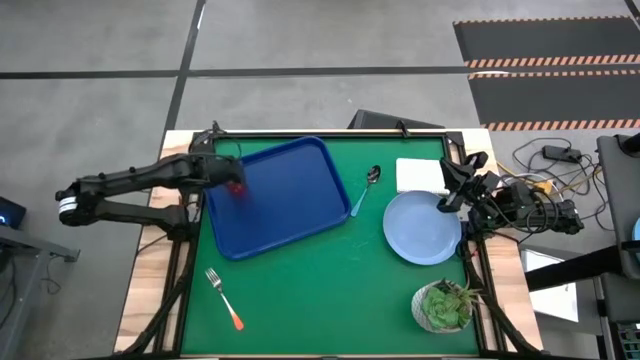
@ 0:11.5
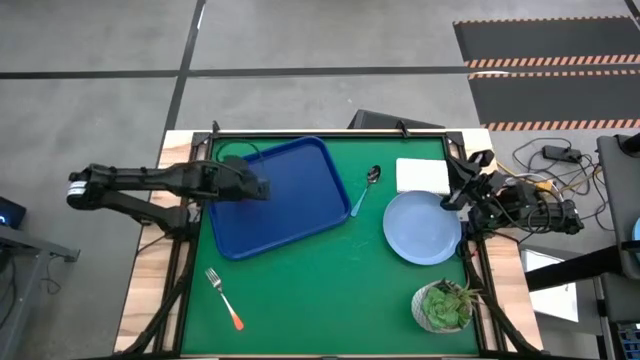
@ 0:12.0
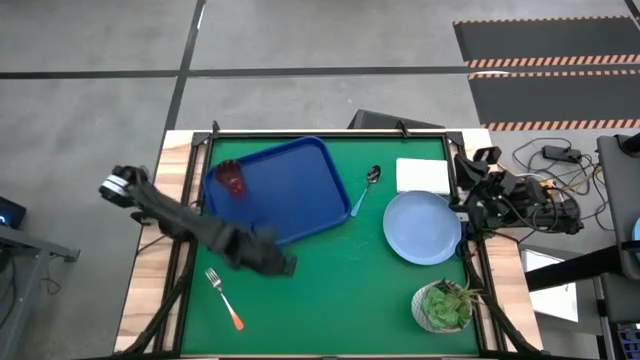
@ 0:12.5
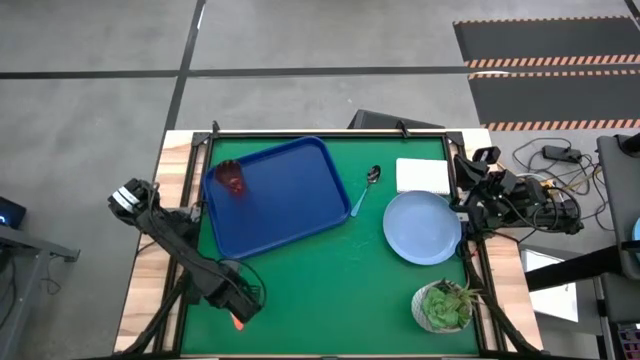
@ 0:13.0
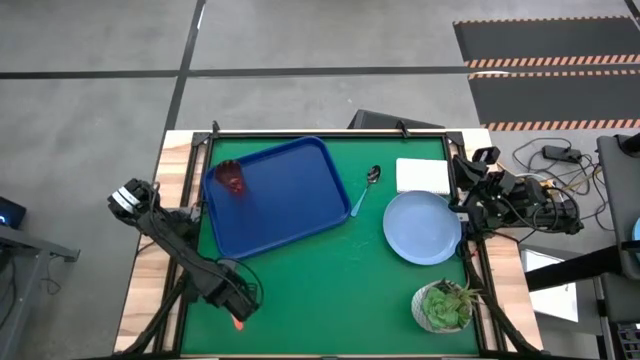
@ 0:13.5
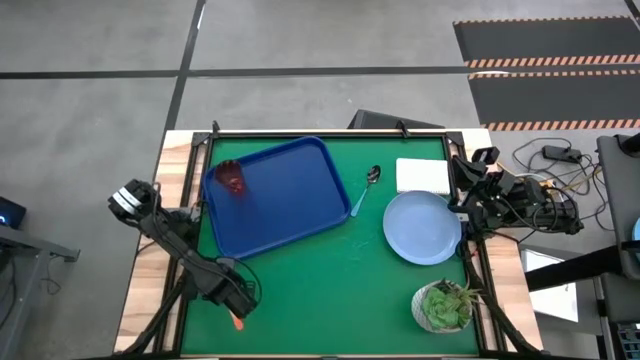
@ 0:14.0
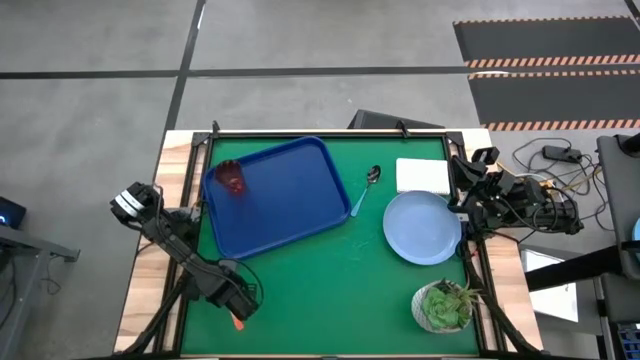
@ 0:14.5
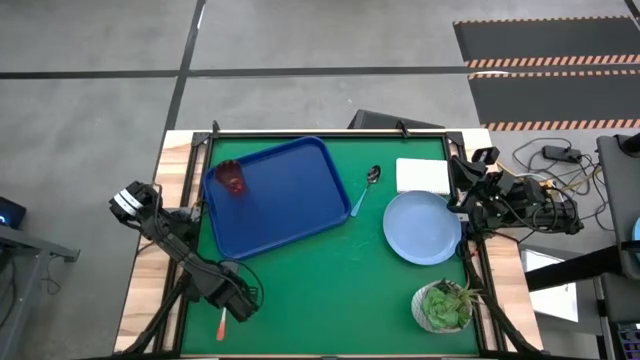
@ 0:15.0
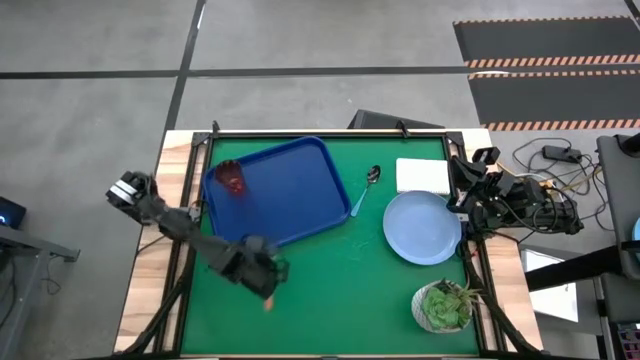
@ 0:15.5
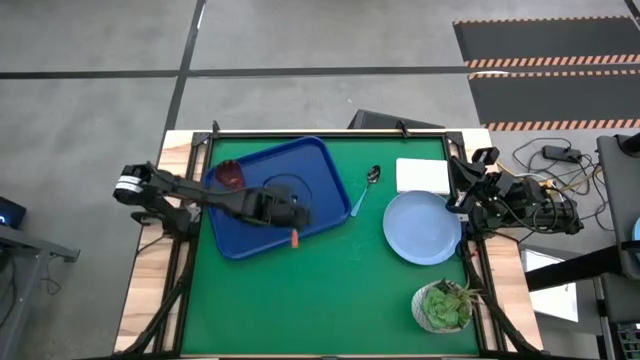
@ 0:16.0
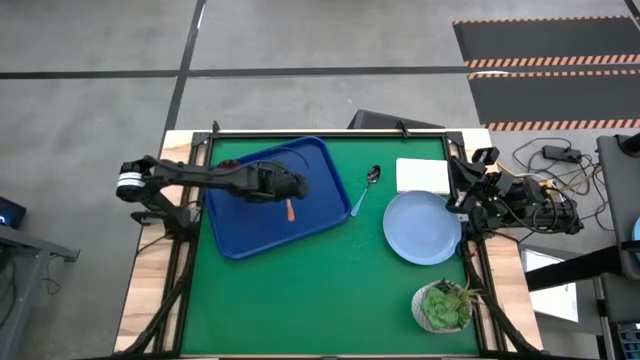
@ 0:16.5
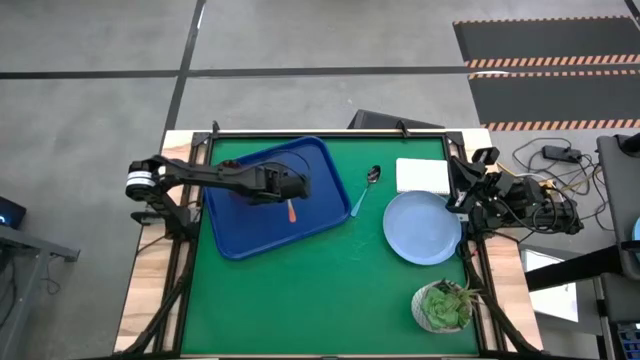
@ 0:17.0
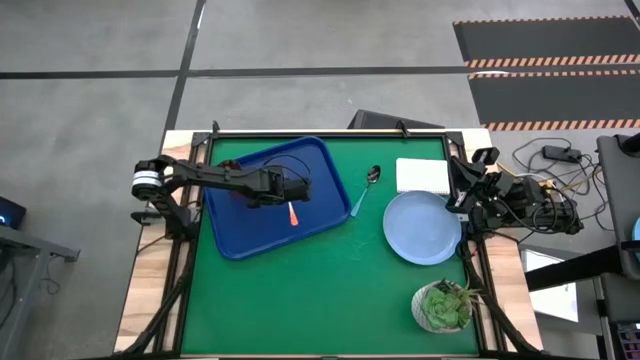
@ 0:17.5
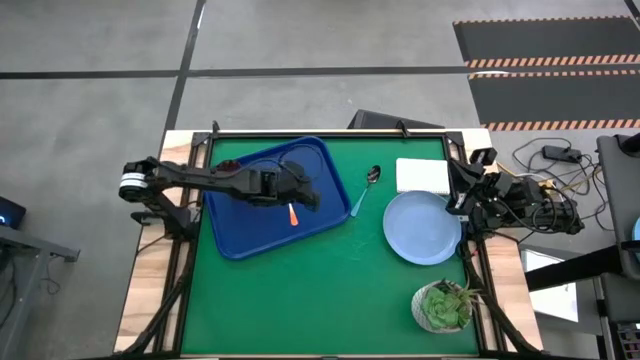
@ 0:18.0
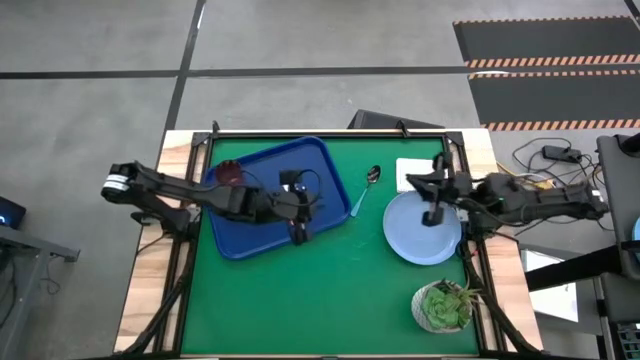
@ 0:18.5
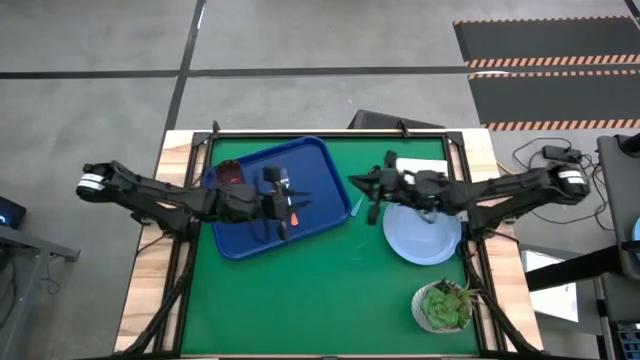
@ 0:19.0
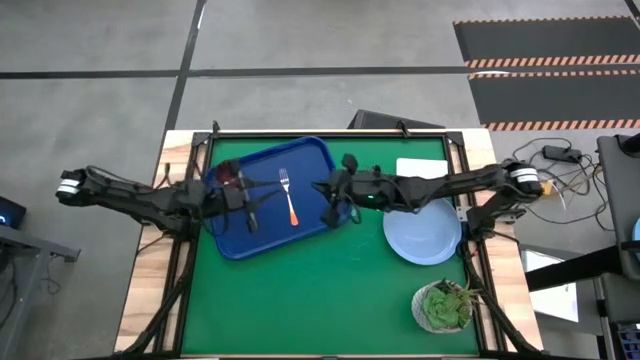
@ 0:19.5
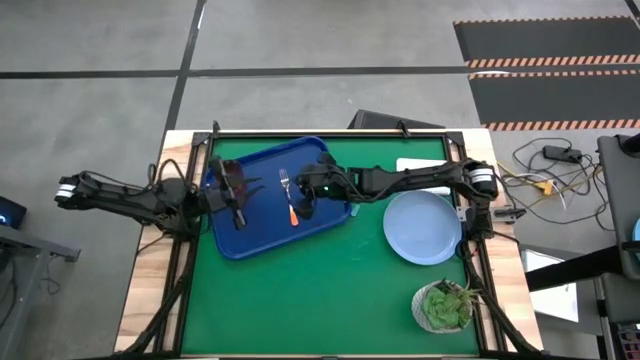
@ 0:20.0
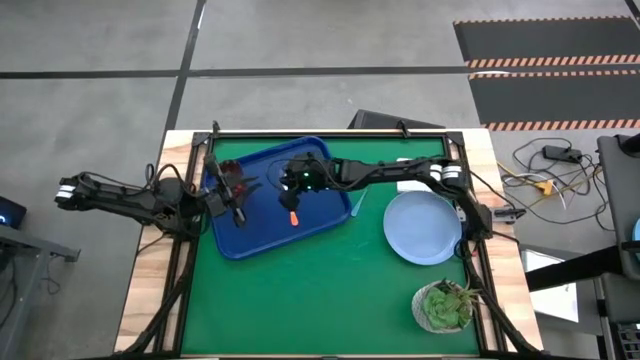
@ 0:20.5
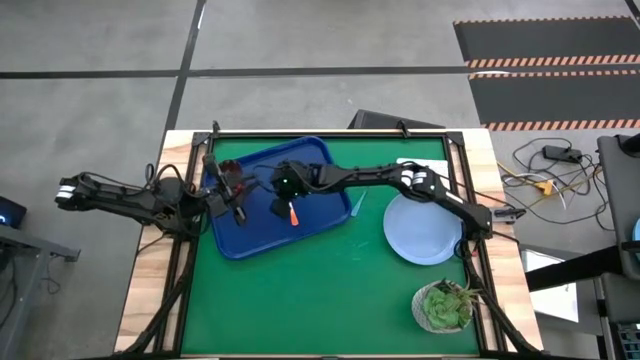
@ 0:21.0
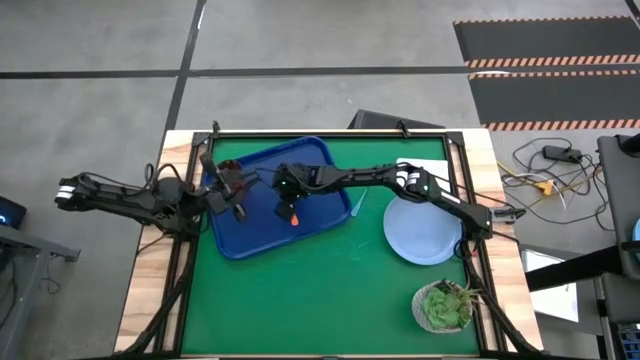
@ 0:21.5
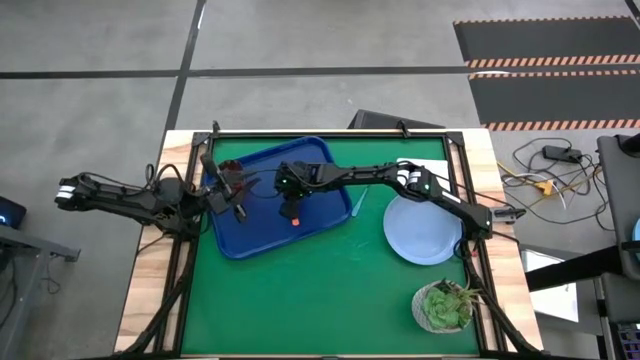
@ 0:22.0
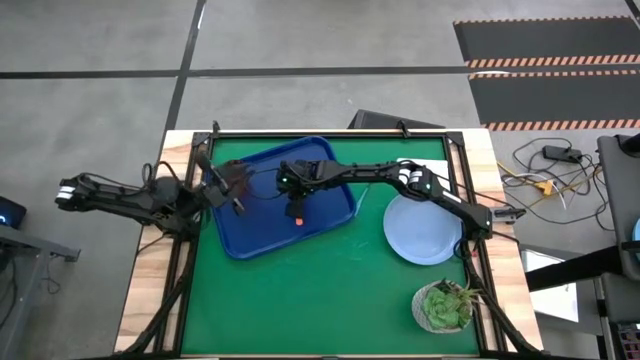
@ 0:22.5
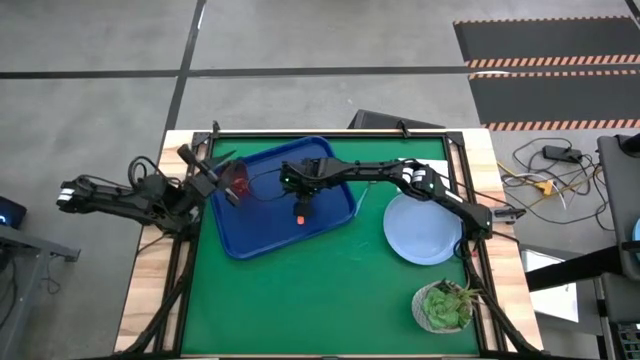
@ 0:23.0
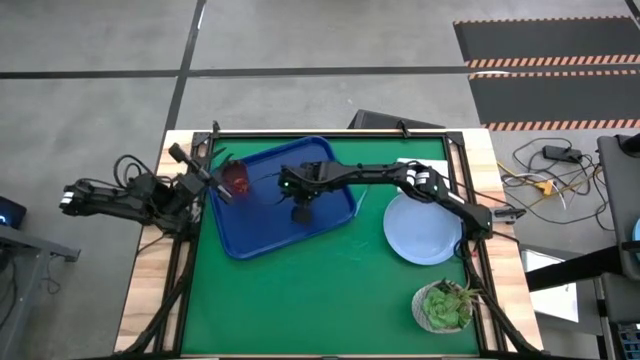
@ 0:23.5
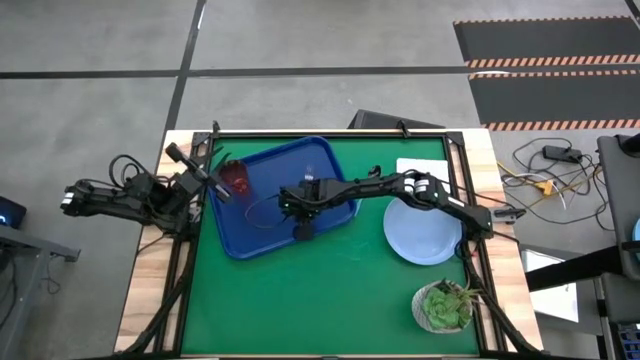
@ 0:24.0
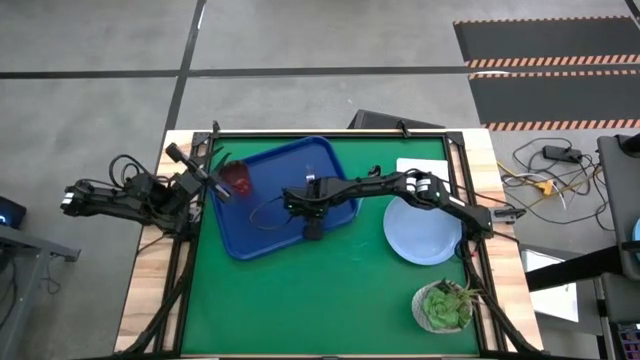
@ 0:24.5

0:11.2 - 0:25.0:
Task: Pick and place plate/cup/fork/spoon on tray
Put the orange fork to the bottom right on the blue serving tray

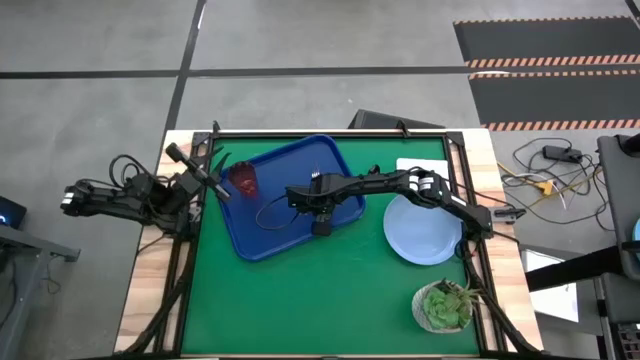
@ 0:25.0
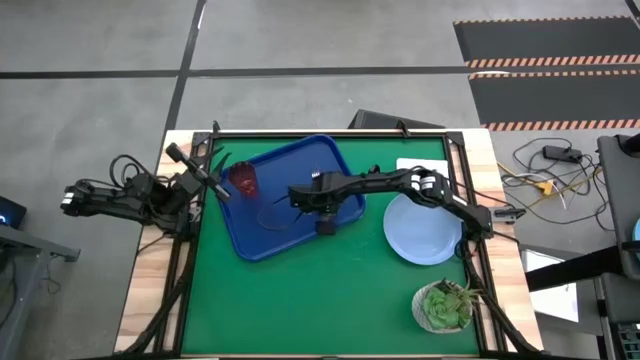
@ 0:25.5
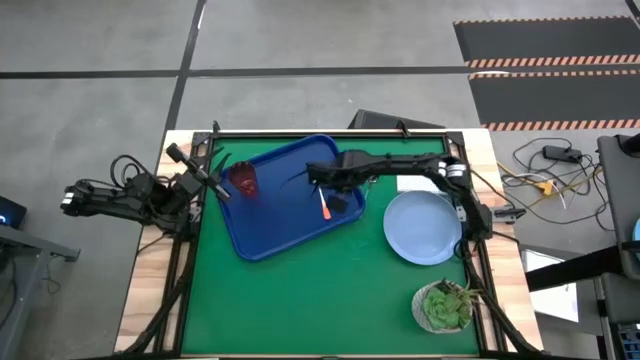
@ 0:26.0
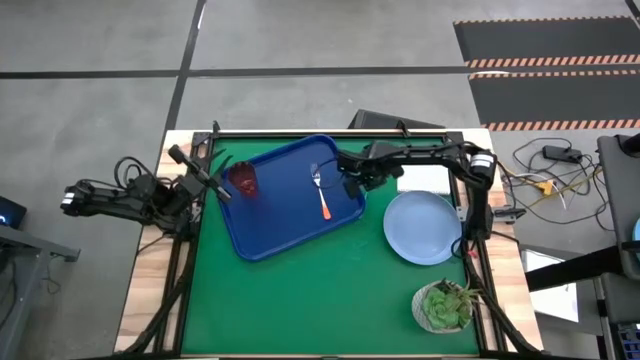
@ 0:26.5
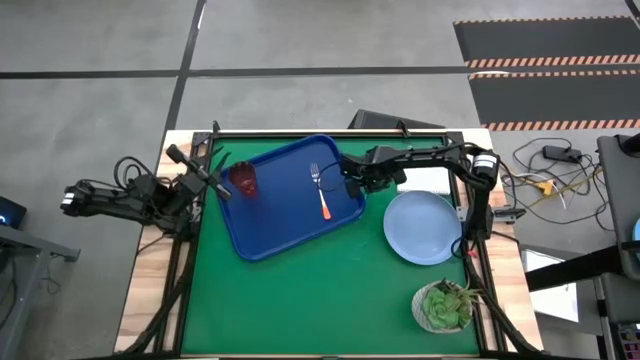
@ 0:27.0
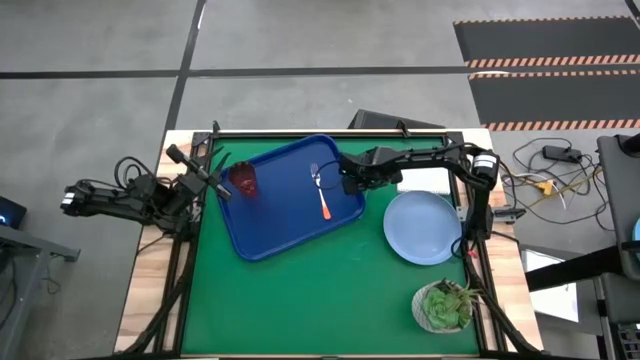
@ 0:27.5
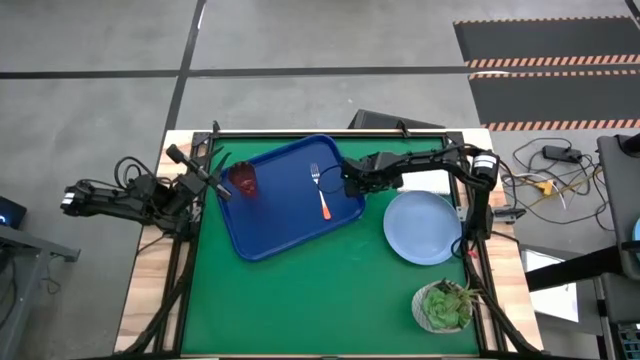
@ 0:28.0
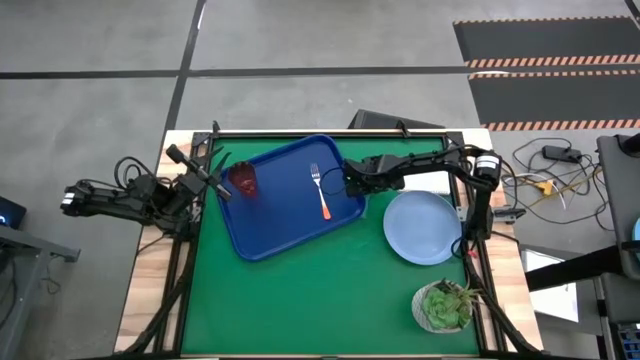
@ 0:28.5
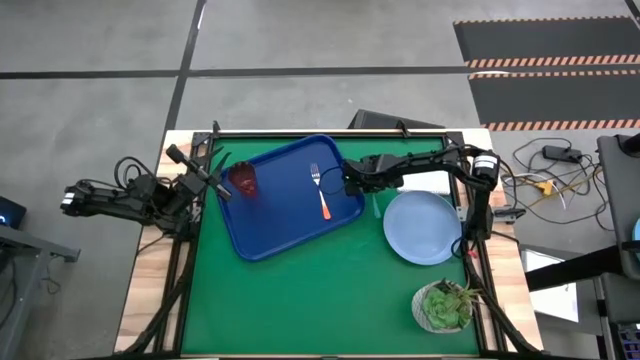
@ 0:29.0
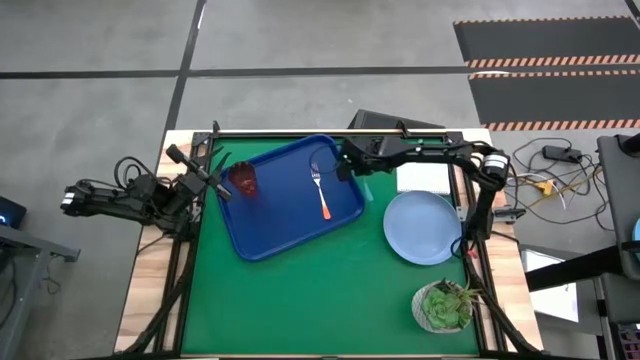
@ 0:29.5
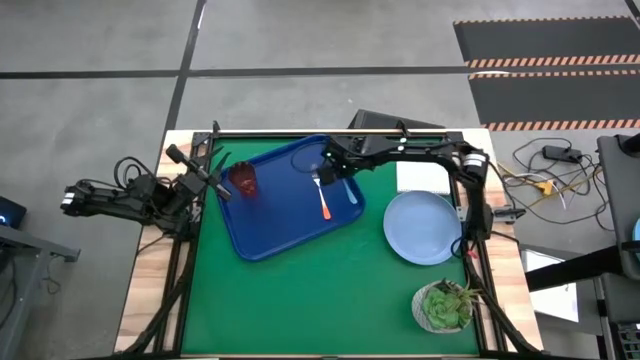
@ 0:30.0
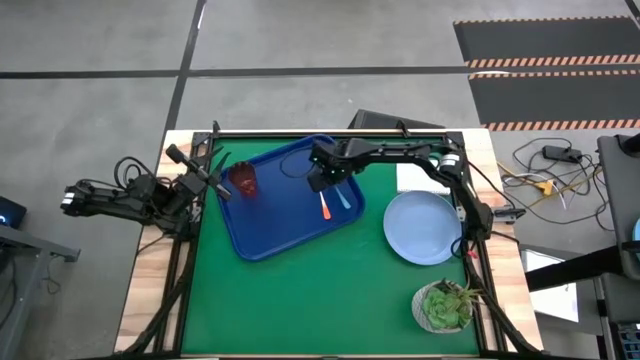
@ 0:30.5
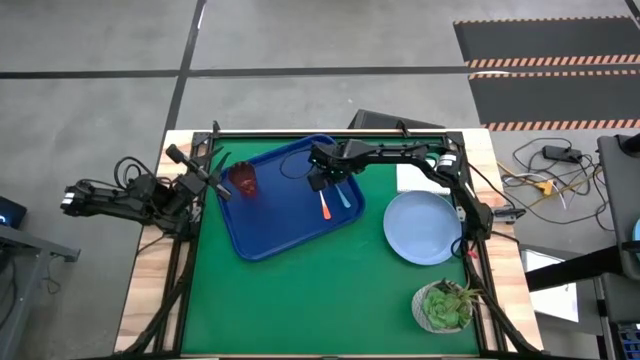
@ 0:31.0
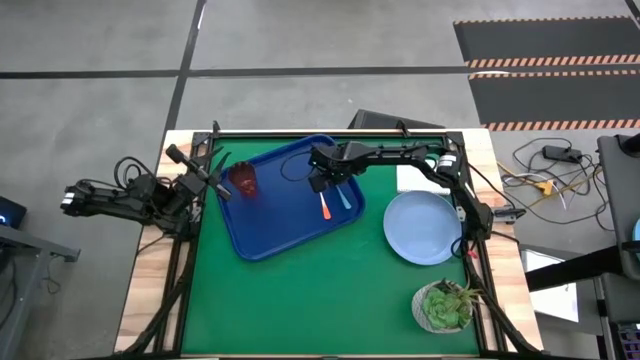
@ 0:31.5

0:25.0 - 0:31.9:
Put the blue spoon on the blue serving tray to the right of the orange fork

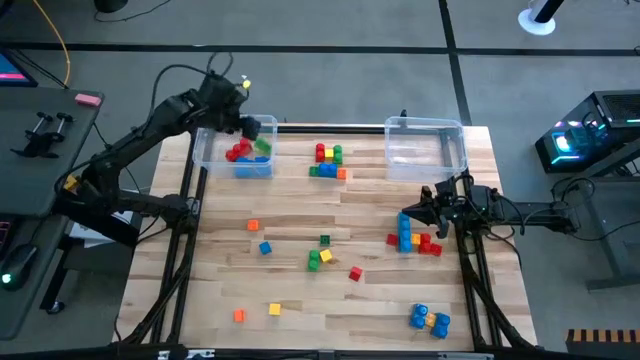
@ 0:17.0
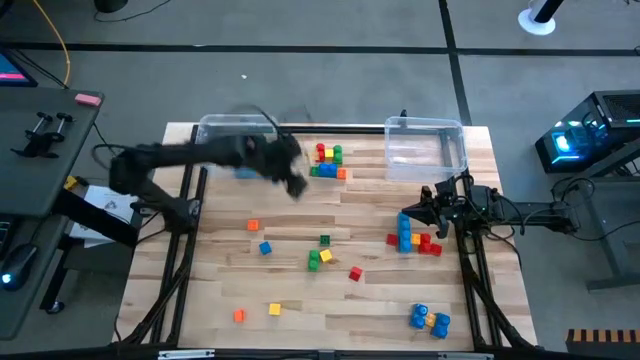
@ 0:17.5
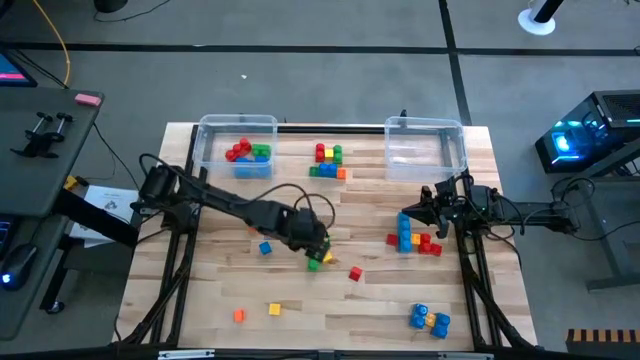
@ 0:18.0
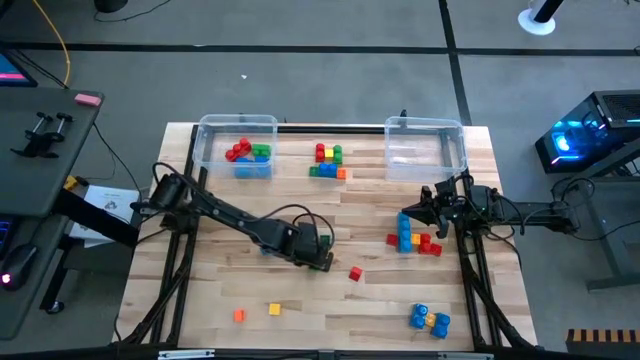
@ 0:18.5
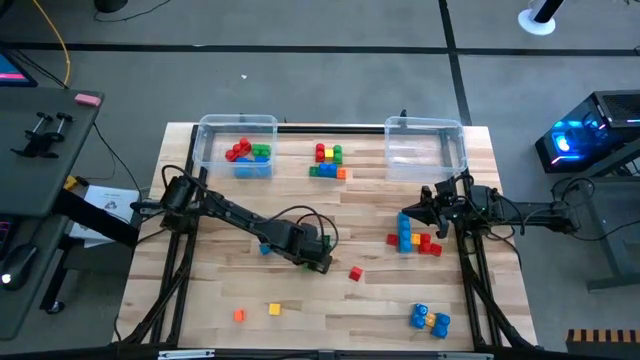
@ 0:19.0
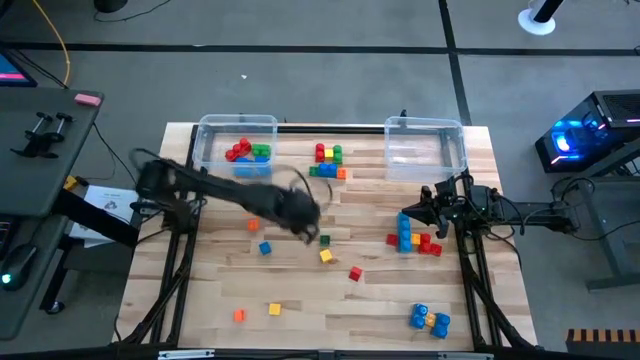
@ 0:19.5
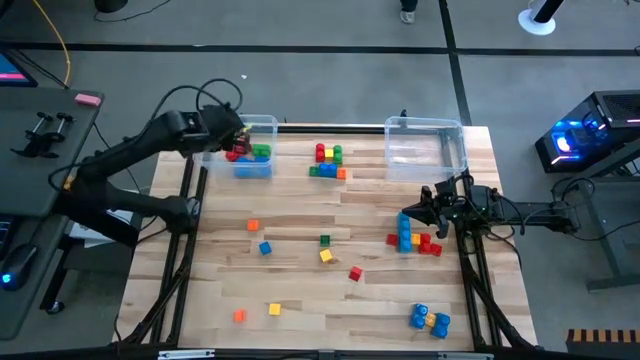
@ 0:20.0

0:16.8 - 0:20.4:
Task: Sort blocks by size
Put the large game piece into the left transparent bin
